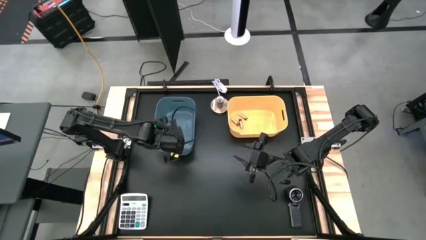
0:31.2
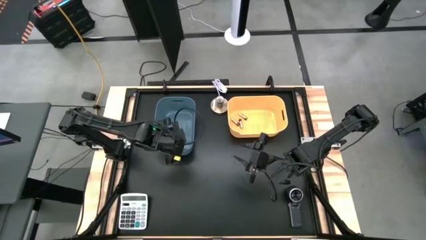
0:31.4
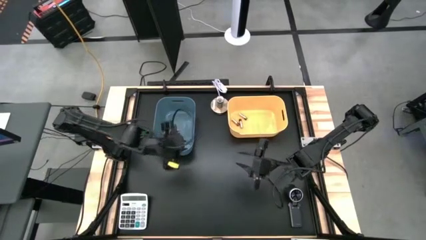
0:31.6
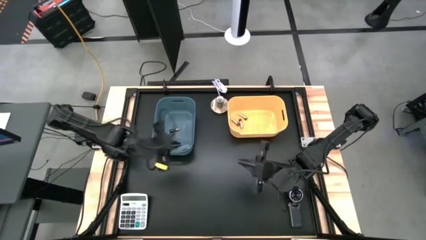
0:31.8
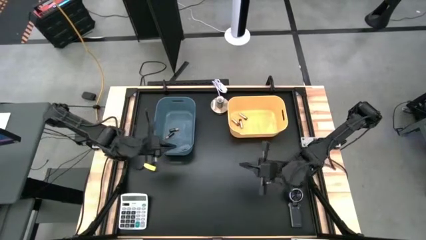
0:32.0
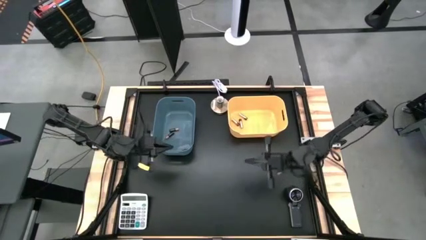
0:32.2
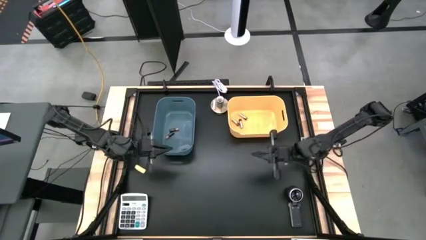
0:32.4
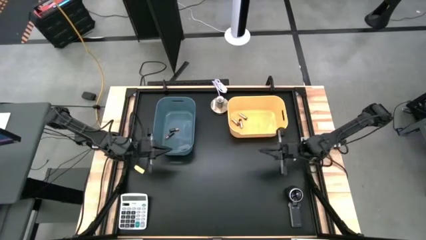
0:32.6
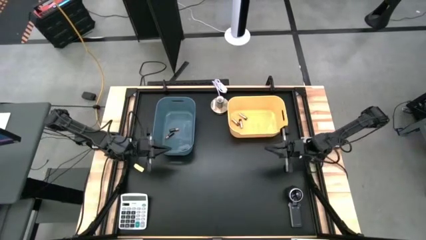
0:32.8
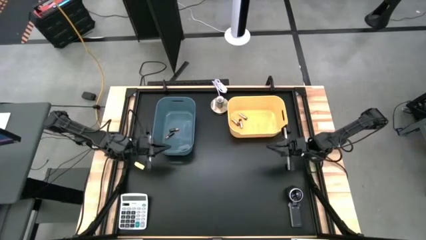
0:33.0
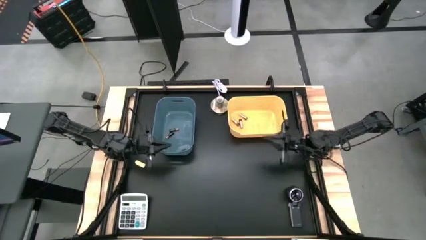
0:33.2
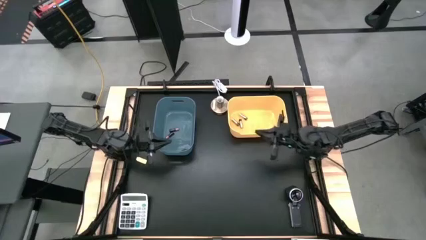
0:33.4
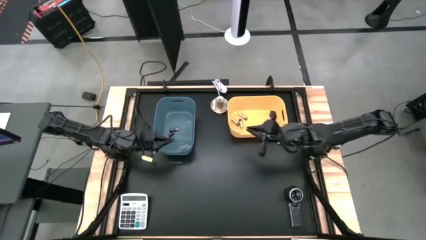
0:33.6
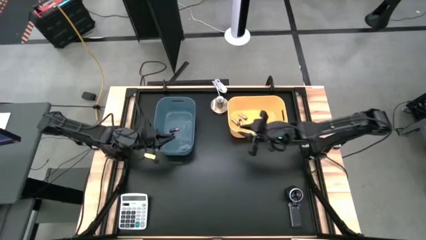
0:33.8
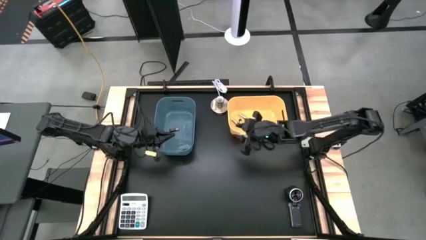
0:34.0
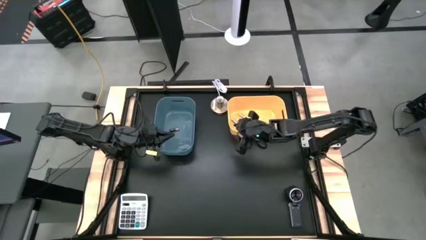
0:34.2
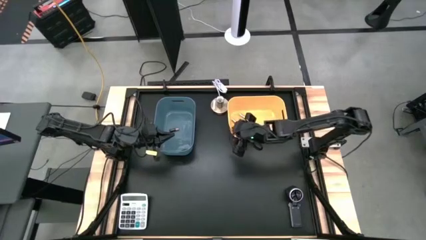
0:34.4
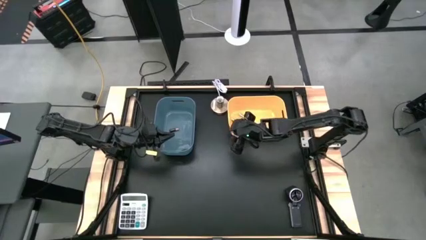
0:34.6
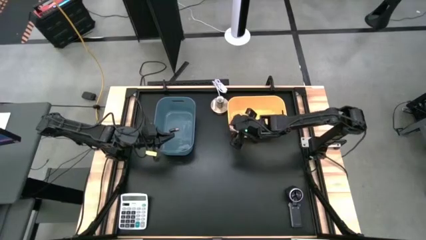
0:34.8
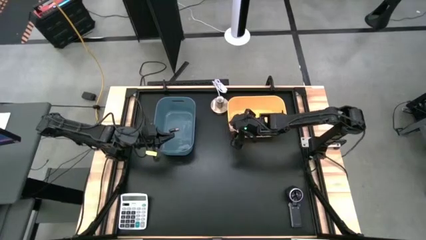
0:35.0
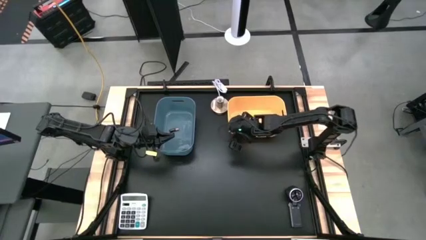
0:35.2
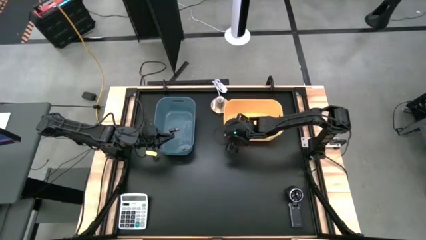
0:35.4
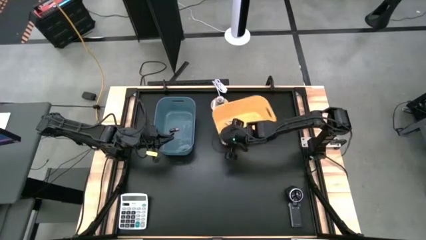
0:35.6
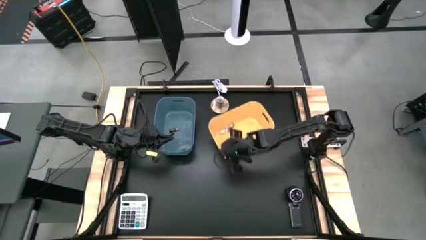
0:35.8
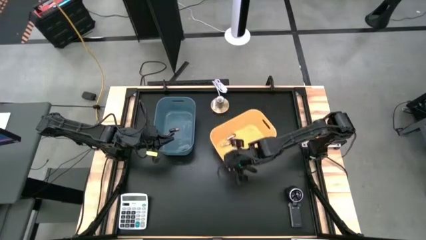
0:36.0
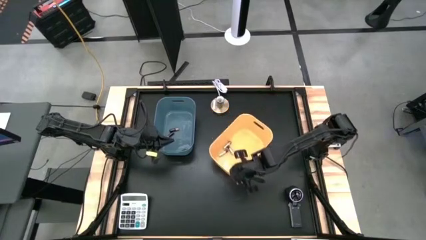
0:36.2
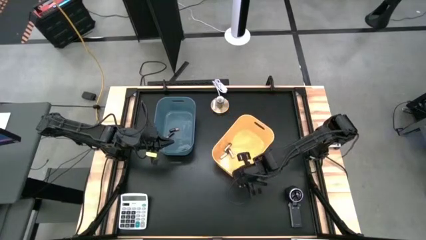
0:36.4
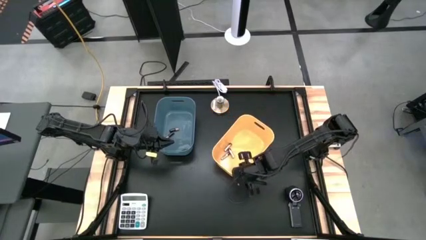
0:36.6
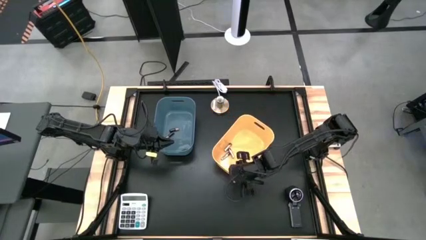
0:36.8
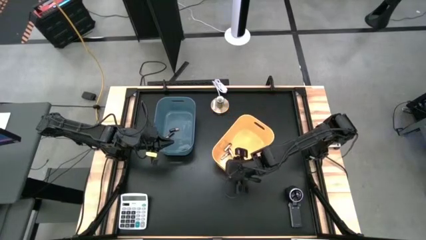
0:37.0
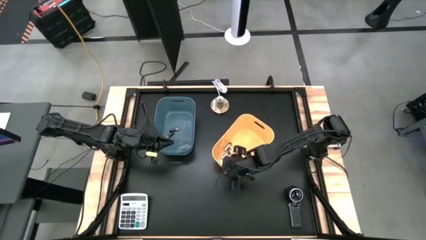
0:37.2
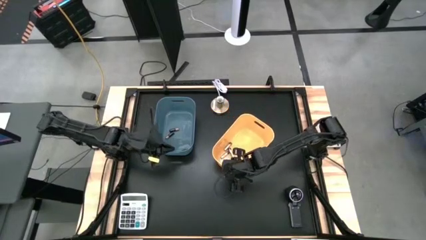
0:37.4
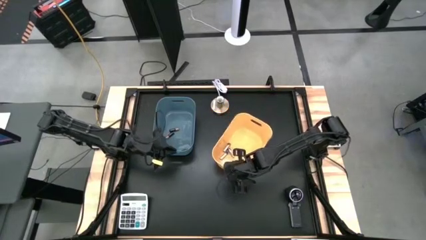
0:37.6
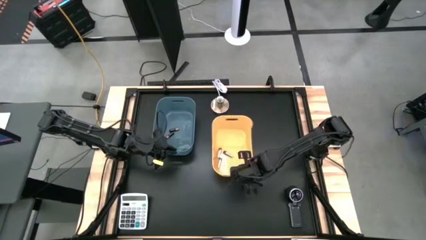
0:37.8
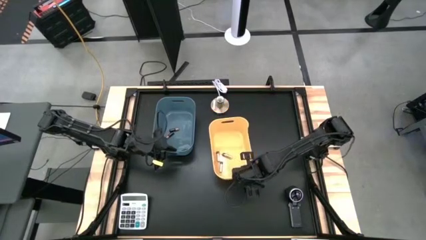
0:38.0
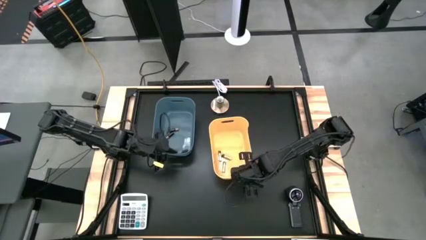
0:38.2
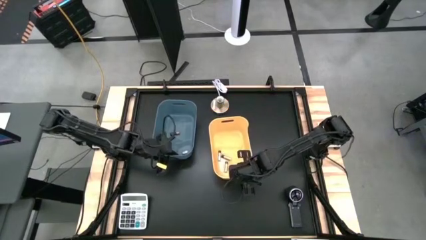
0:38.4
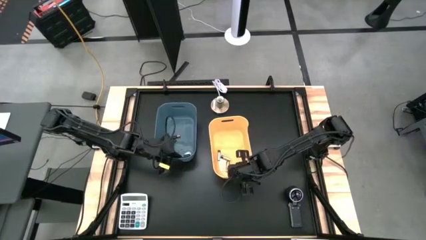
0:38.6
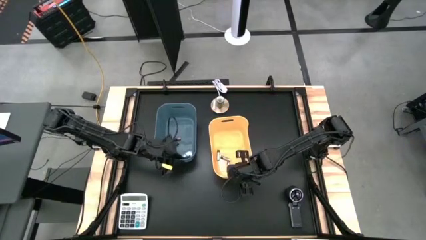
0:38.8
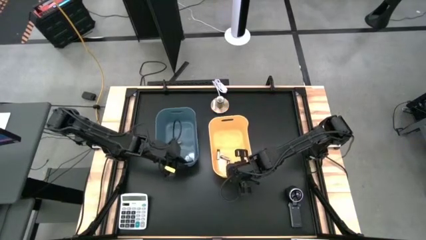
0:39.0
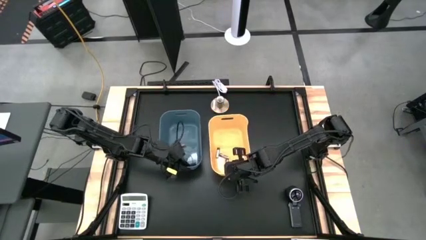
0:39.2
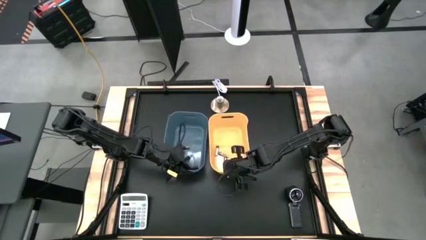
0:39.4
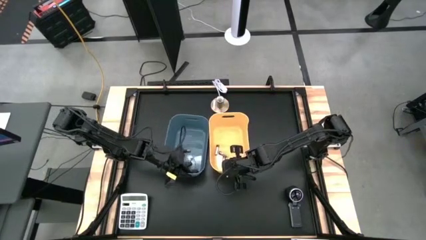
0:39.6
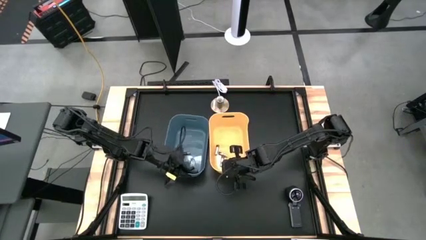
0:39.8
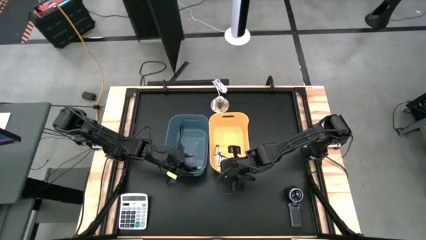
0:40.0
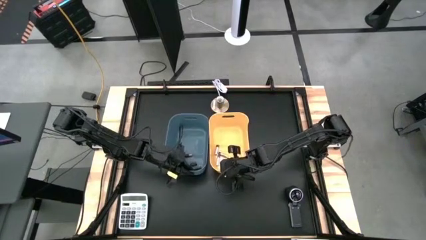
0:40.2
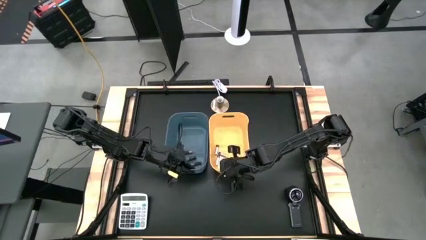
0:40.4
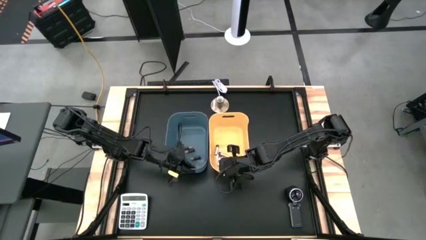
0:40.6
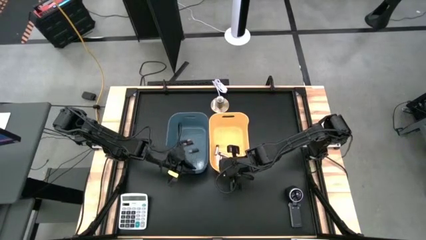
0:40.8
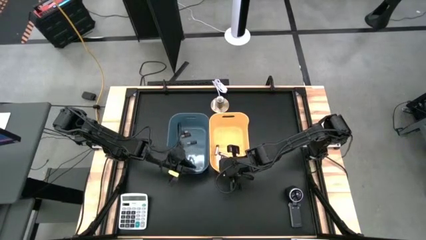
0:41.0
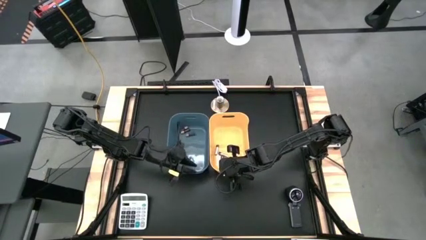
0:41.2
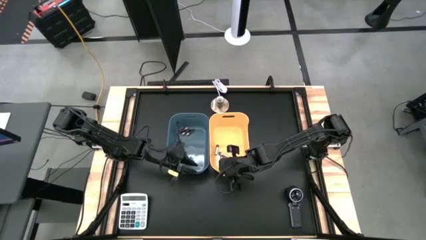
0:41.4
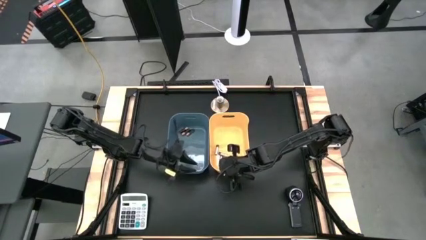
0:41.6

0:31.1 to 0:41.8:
Task: Sort batteries
Move the yellow and blue bins to the center

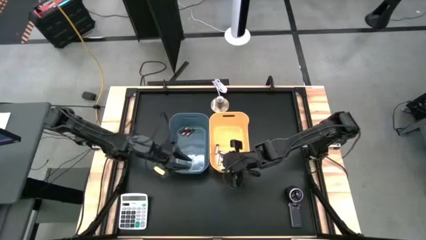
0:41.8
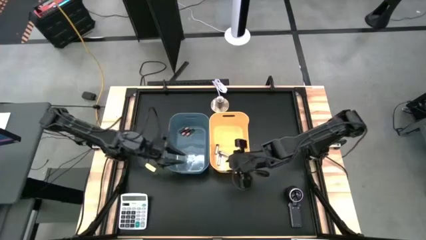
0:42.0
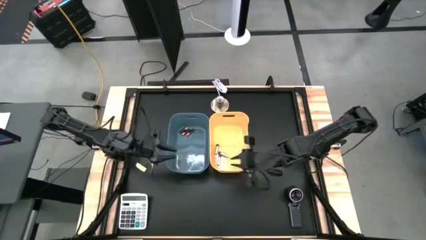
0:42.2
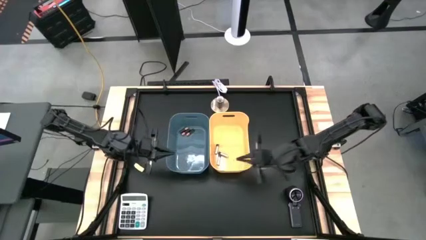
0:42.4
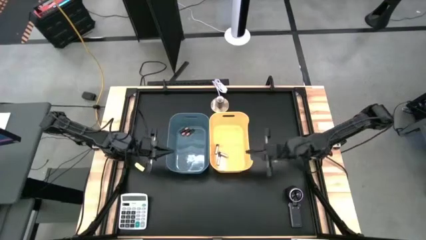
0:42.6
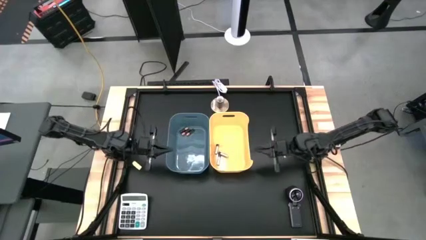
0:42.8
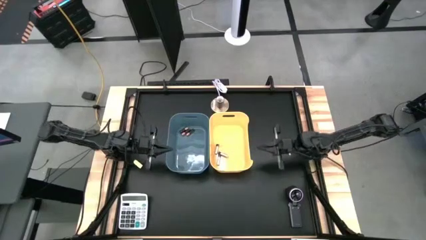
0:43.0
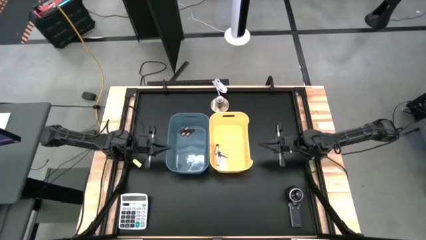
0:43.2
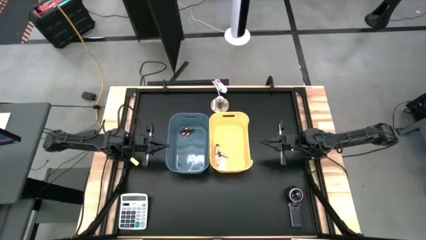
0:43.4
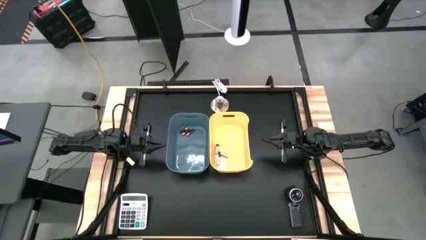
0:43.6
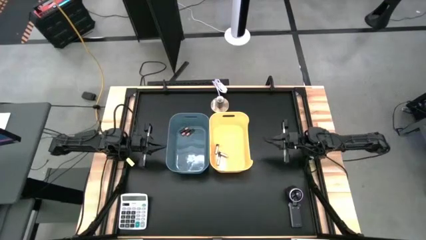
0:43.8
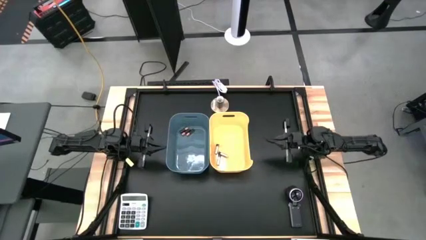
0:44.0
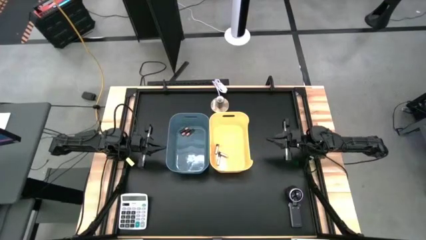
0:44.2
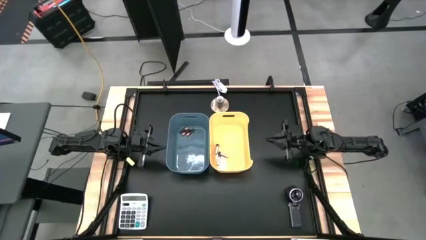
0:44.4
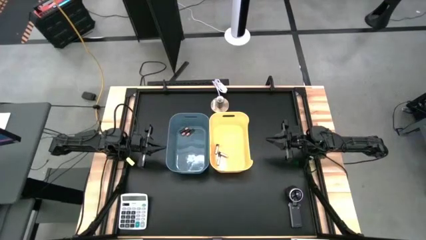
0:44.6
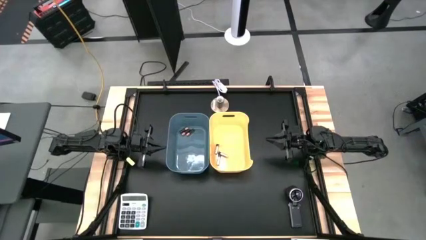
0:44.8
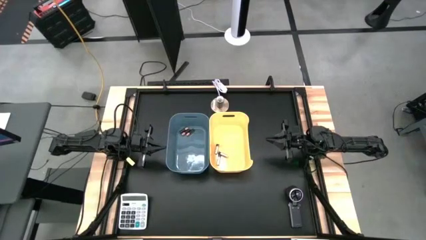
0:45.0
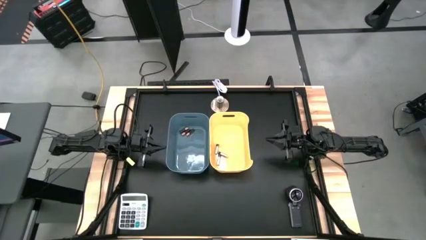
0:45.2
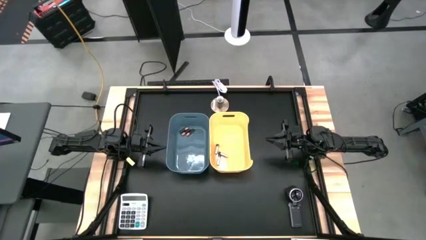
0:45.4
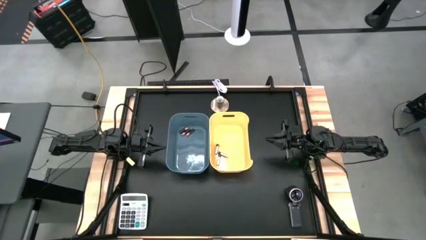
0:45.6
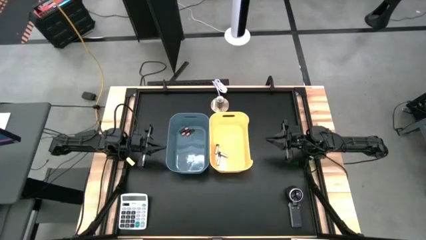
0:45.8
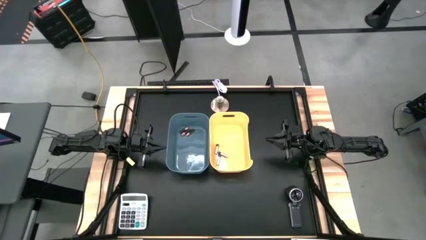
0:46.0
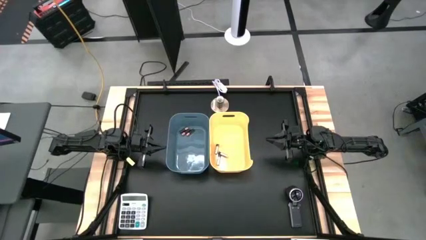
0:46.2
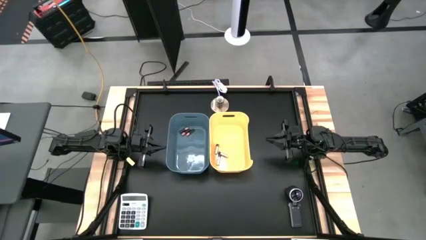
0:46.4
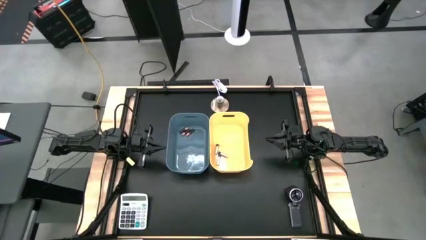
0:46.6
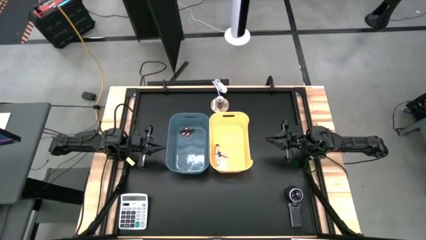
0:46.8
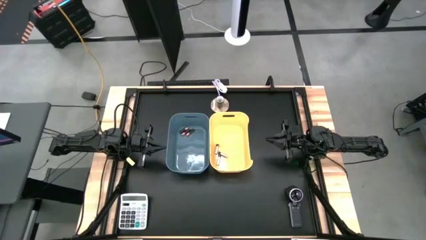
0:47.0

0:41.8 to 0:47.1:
Return to Home Position
